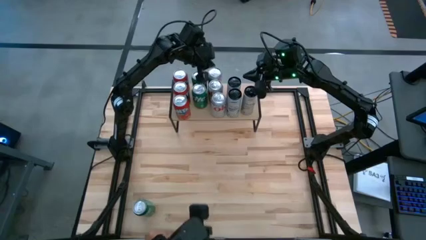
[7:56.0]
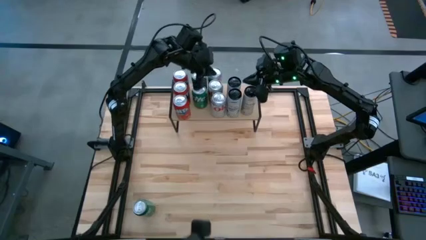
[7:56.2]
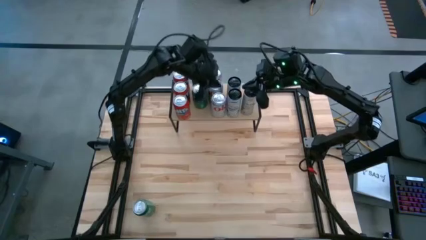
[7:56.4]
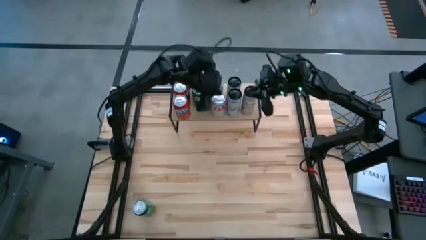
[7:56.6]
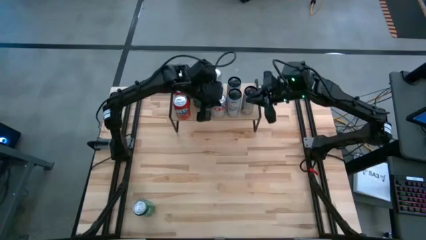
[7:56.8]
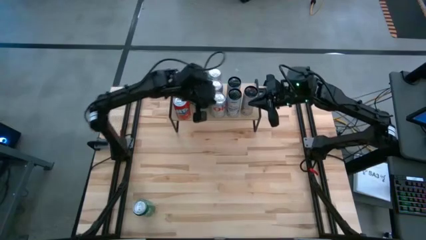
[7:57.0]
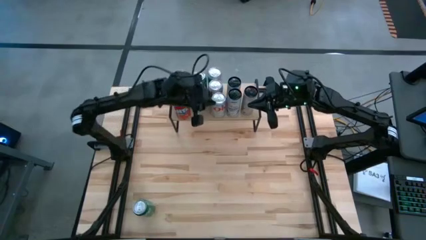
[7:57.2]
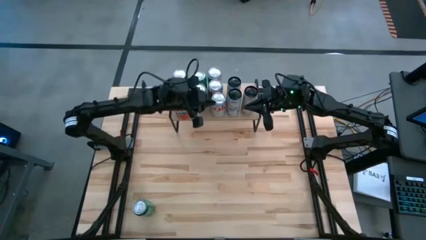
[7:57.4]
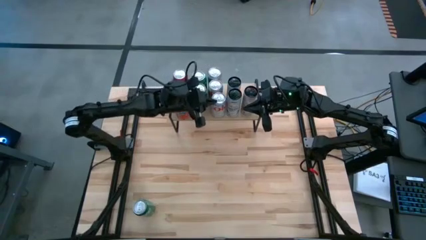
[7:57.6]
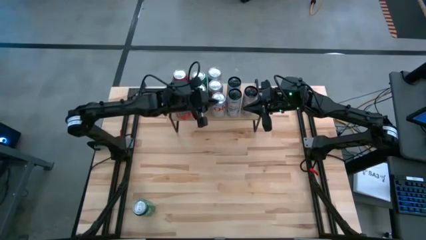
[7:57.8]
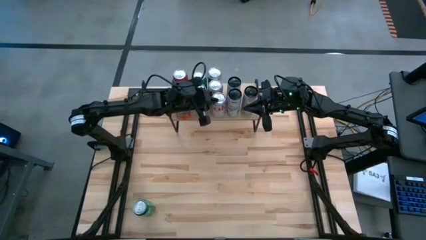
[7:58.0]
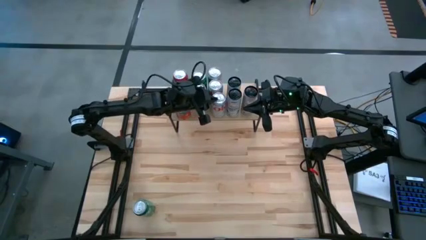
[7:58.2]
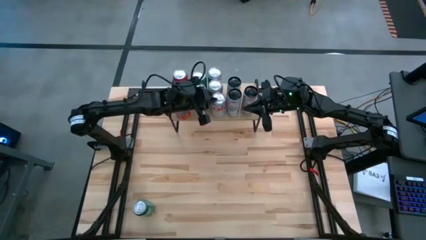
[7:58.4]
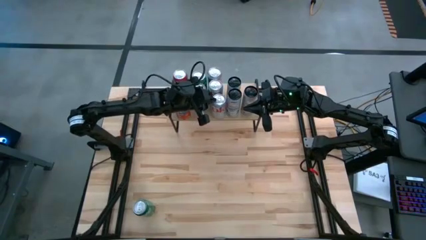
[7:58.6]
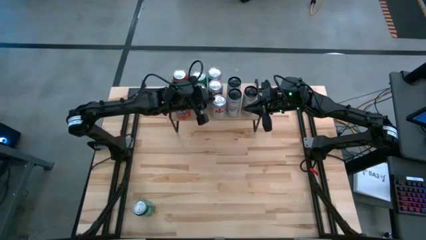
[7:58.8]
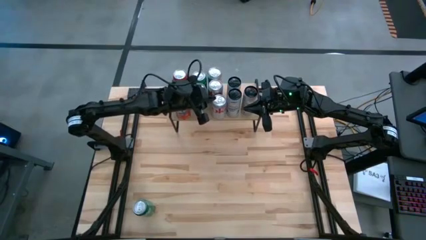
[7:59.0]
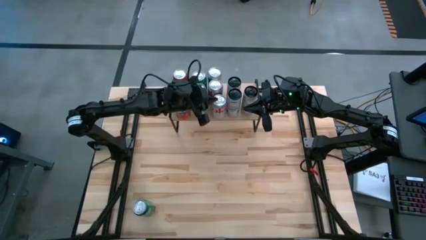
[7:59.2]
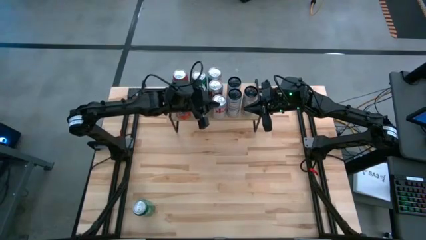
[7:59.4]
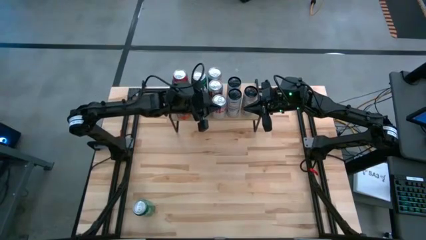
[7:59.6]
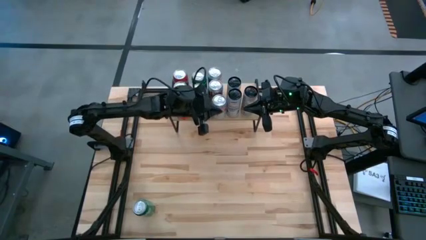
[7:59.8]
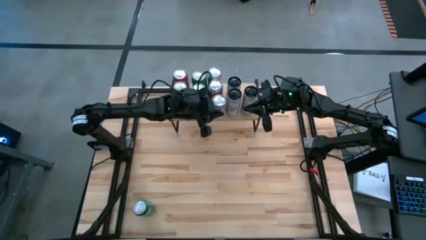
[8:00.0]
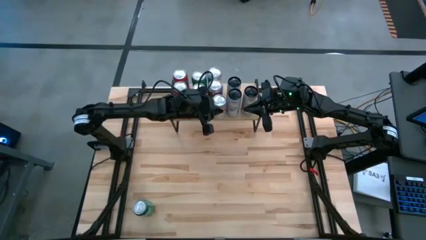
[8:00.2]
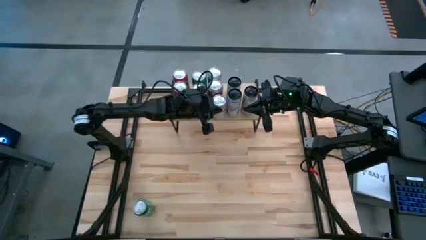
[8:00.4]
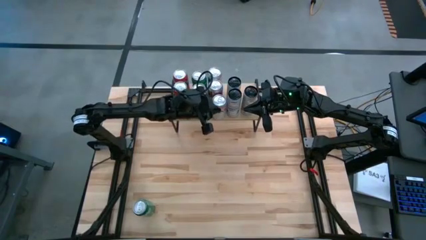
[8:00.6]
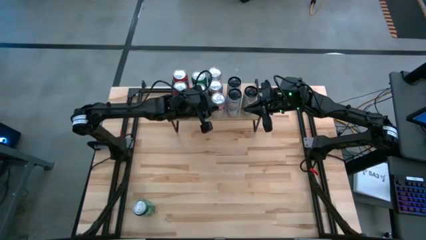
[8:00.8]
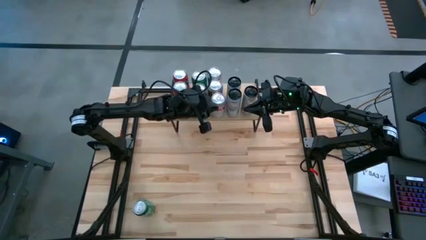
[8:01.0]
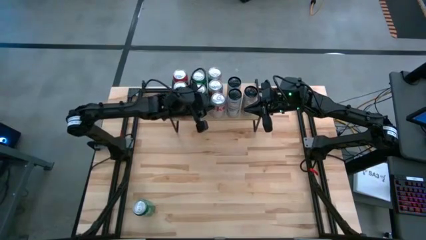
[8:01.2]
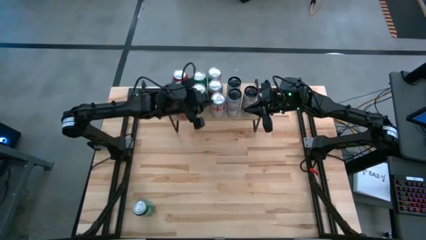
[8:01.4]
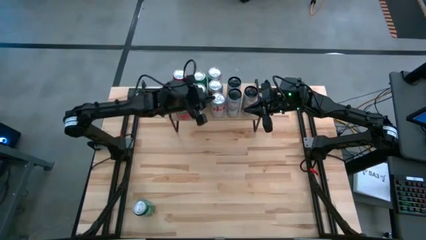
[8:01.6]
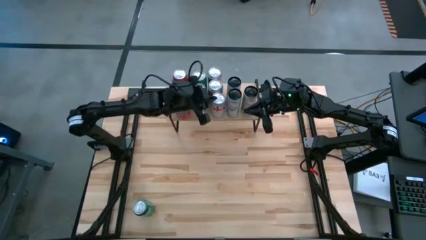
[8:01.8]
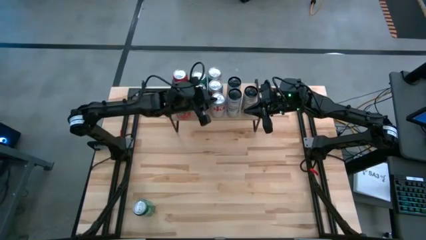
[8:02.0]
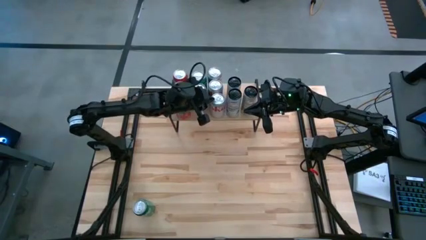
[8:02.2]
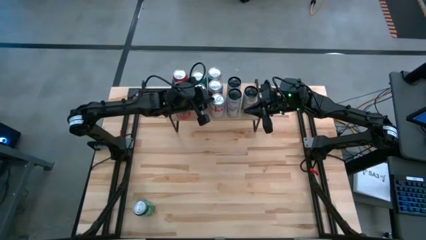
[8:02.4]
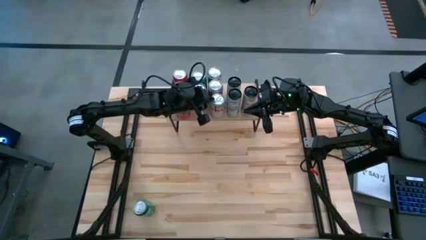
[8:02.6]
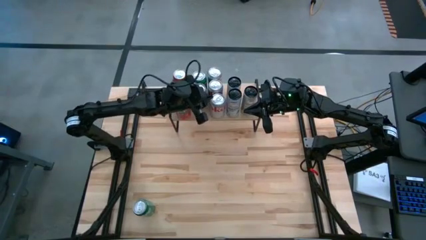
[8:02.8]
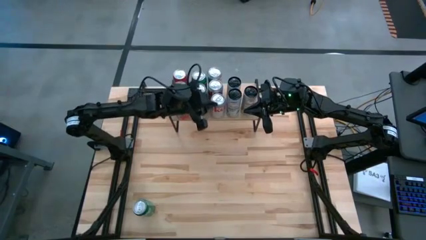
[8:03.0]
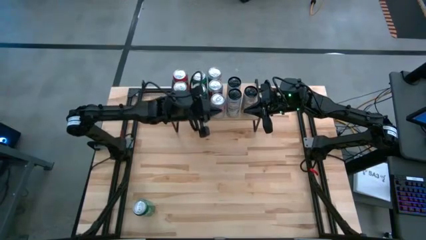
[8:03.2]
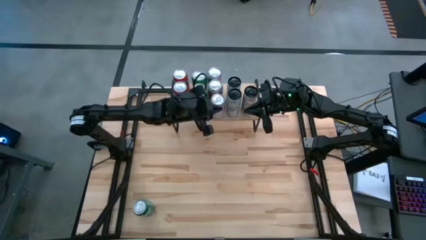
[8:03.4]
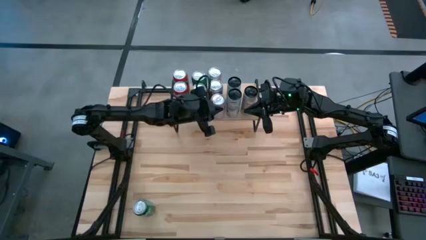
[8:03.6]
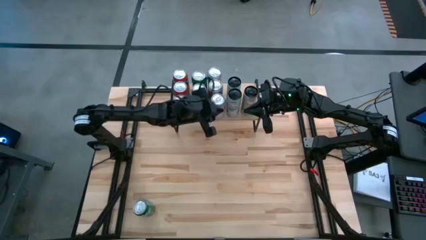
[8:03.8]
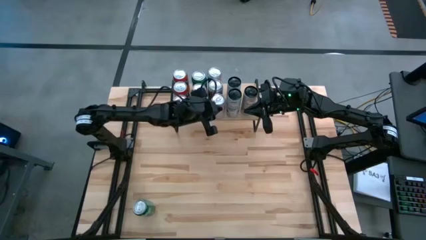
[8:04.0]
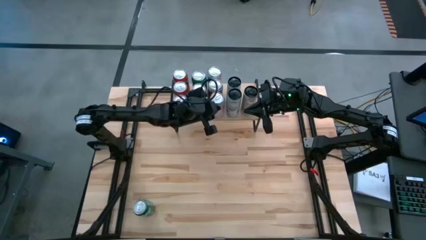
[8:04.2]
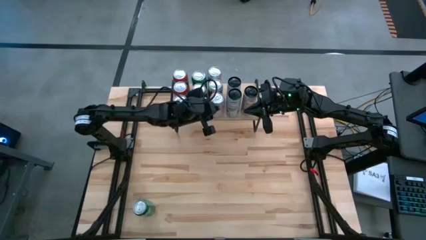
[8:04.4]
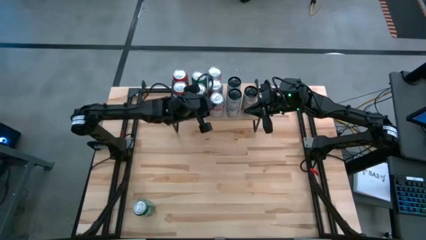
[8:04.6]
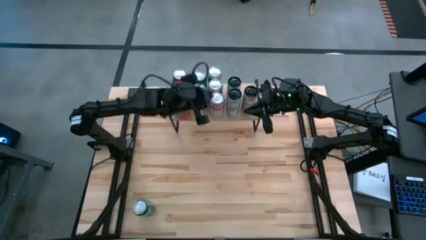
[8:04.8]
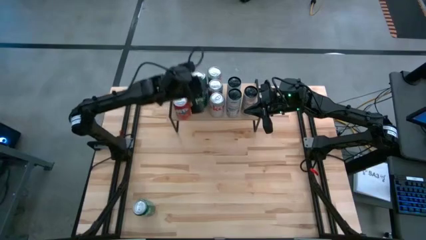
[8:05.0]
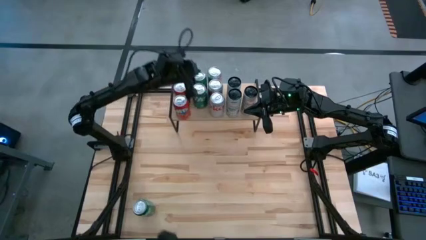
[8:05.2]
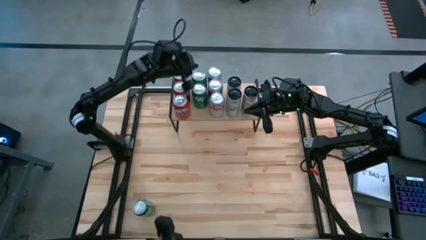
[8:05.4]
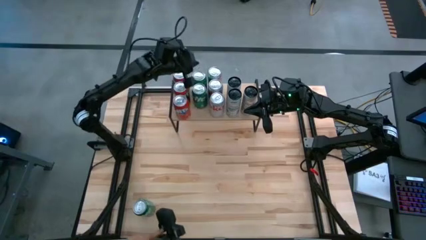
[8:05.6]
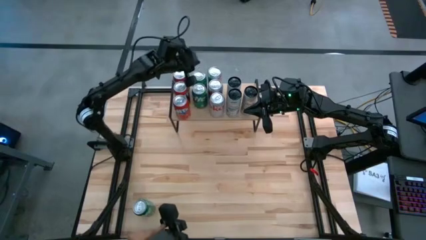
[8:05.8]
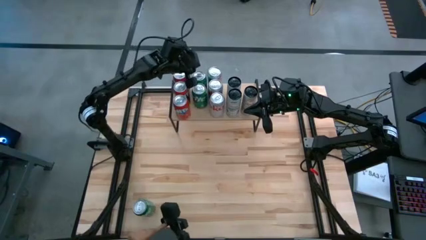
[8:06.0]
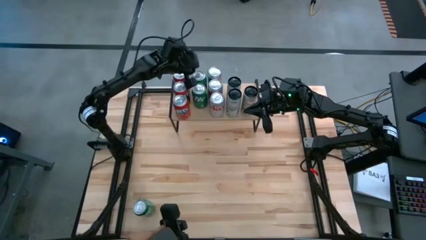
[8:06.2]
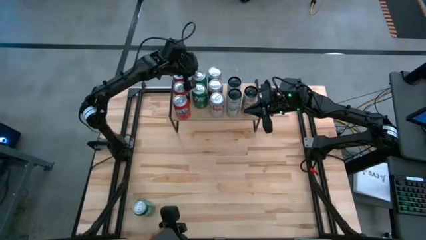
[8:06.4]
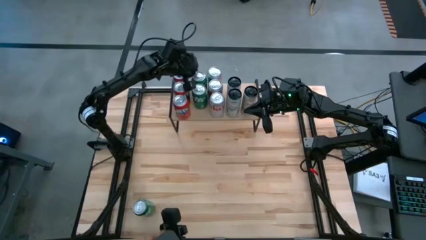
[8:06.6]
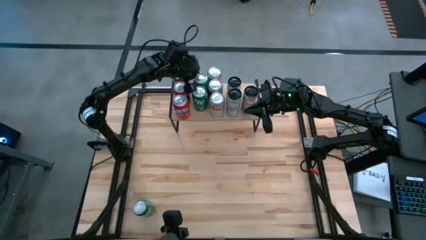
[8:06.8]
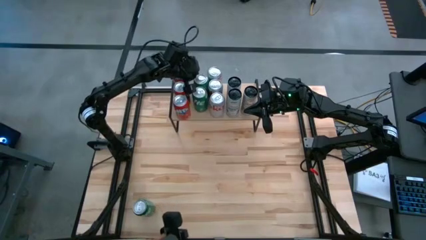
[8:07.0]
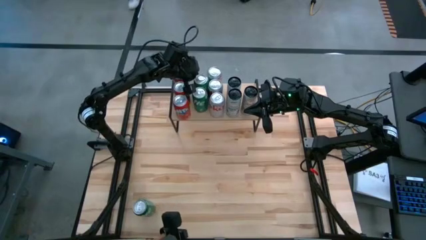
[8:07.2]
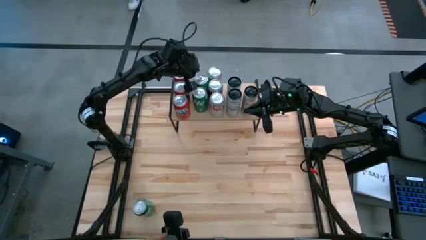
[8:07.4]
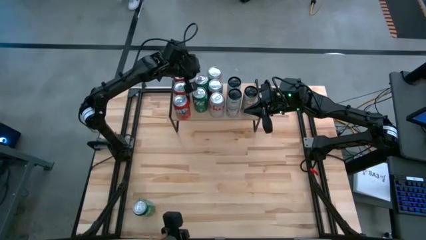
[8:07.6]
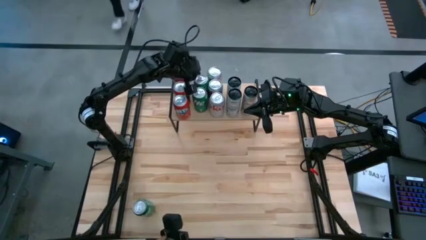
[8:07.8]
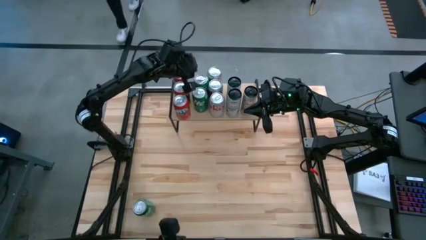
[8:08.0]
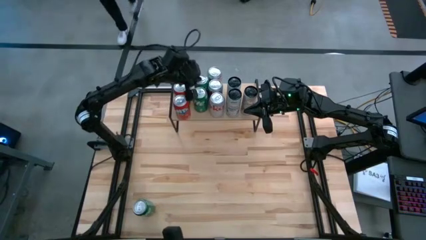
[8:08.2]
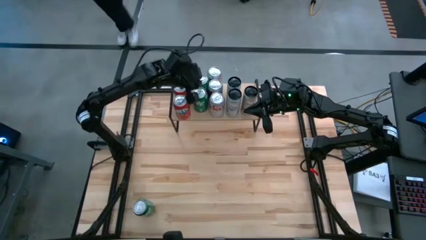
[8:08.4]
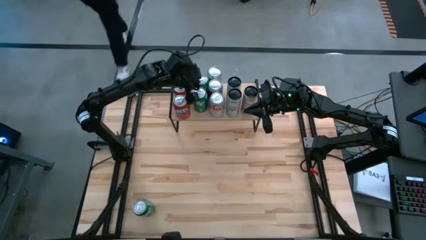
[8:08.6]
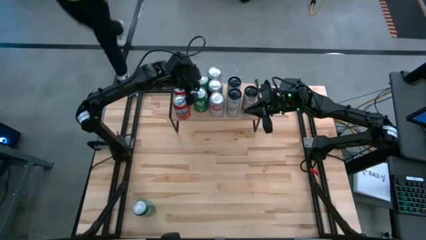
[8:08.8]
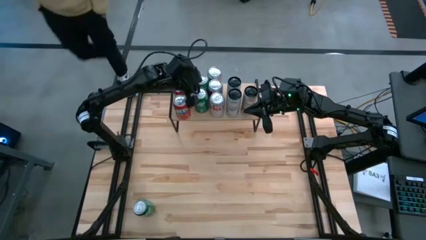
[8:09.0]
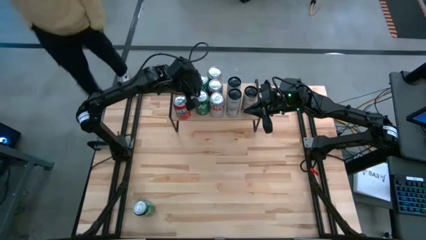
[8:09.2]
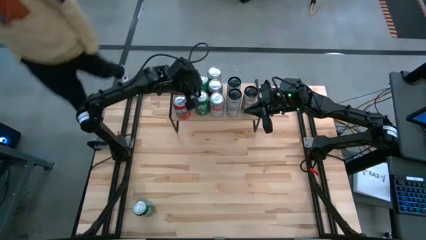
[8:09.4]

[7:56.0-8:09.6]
Task: Place canned beverage on shelf
Adjust the soda cans on the shelf

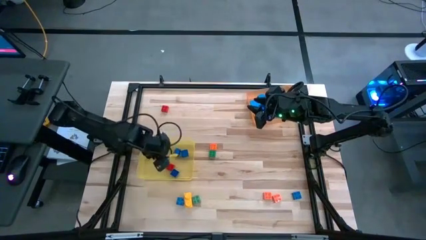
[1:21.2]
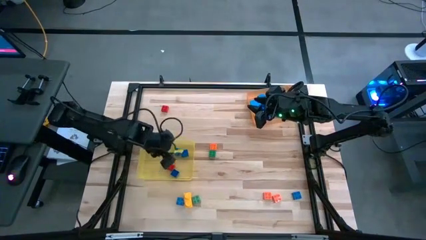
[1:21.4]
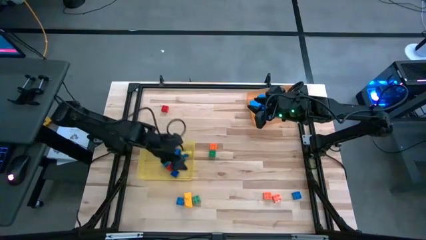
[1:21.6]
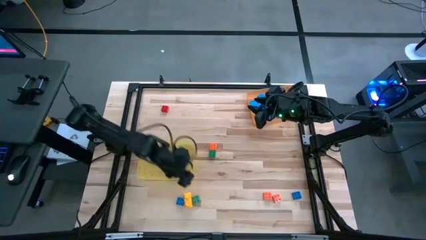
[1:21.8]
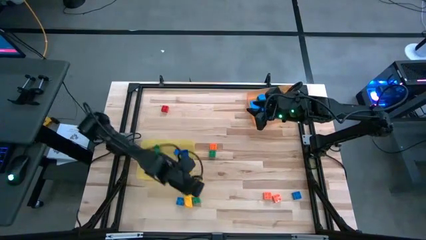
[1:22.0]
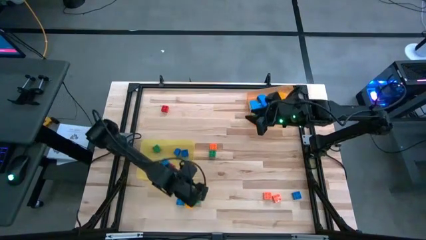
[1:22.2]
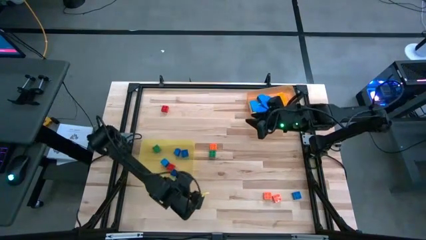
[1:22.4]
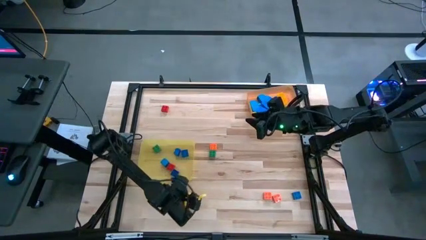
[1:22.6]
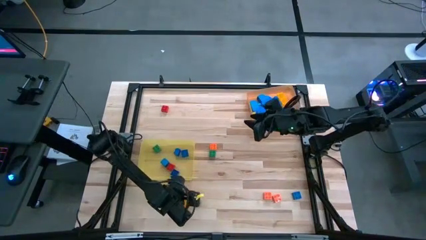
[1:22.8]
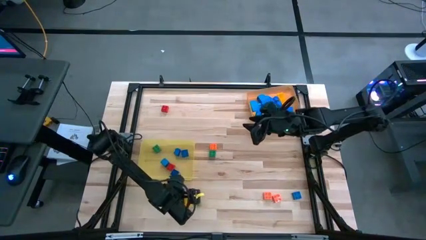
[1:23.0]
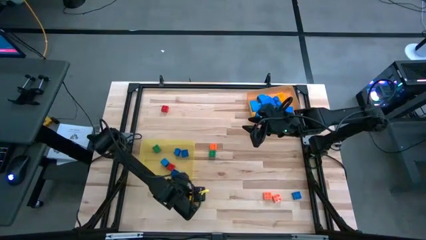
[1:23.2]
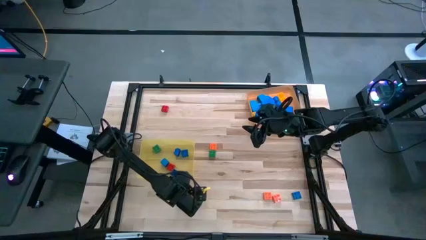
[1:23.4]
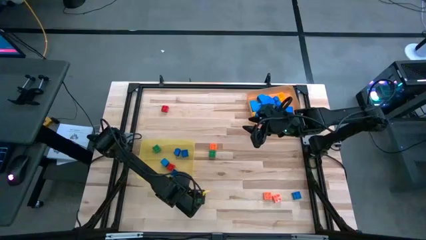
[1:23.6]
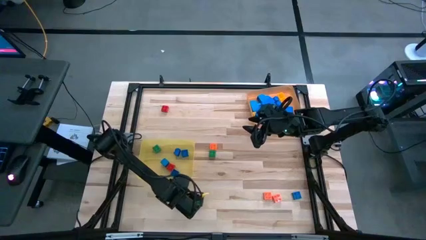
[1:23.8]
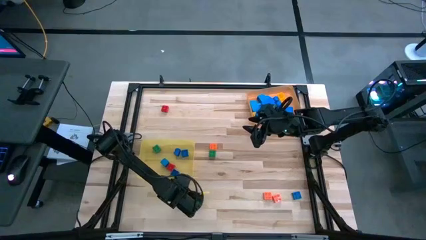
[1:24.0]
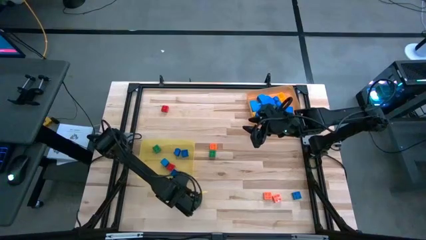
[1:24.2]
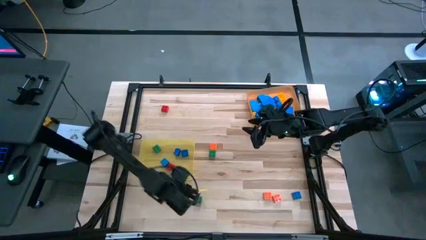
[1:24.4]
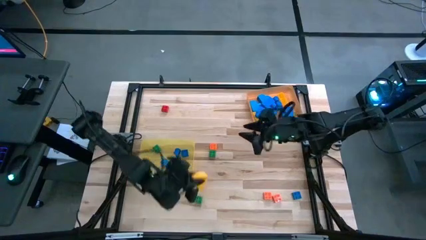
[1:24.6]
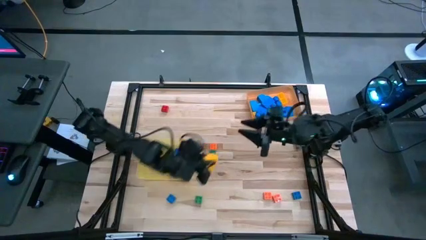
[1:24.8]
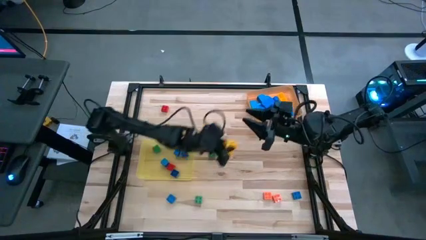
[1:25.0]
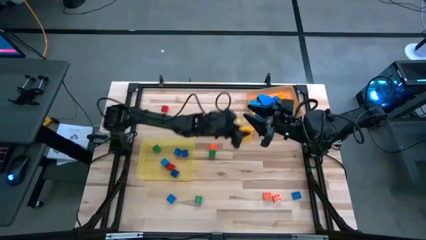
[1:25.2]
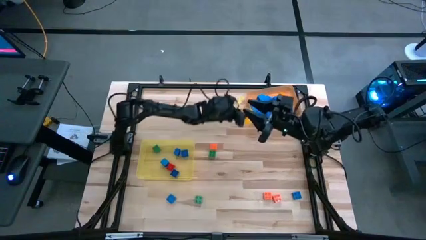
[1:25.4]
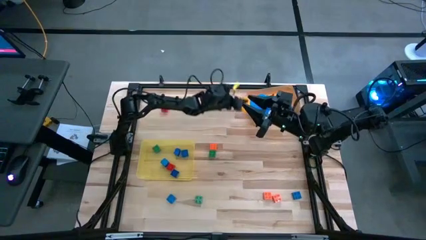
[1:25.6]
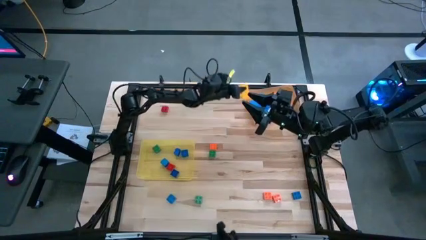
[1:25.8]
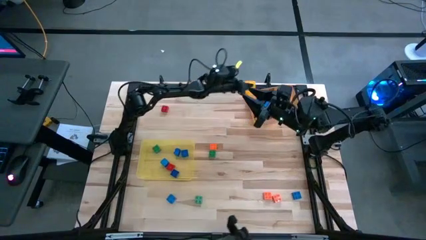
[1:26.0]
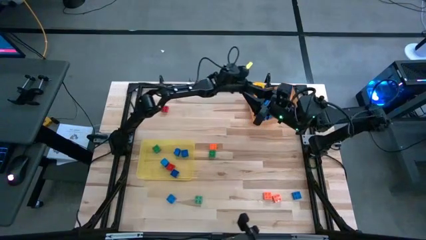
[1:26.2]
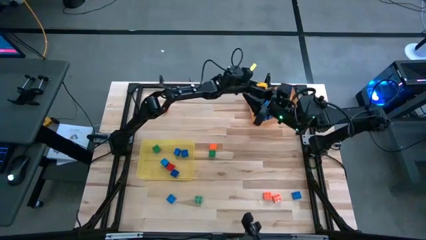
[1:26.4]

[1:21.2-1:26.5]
Task: Sort blocks by size
Put the large yellow 2 stud game piece into the orange bin
